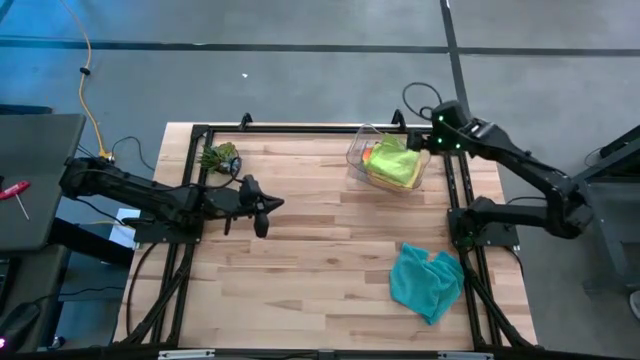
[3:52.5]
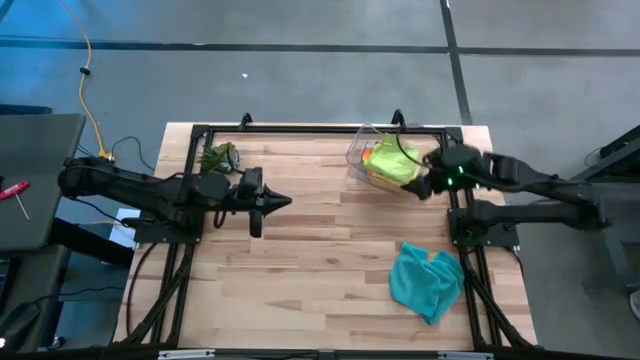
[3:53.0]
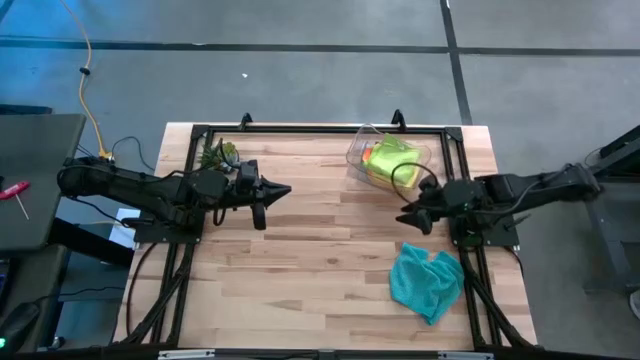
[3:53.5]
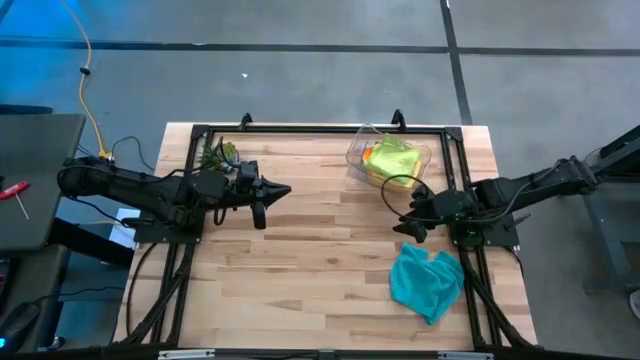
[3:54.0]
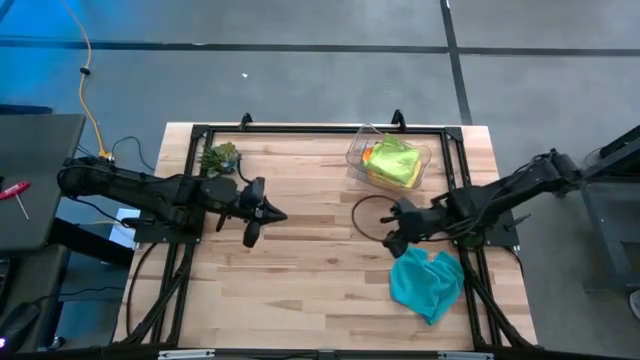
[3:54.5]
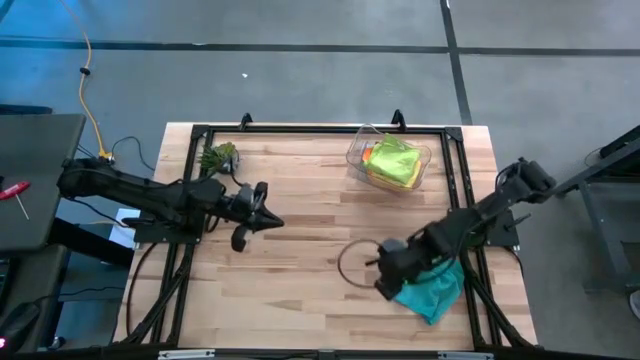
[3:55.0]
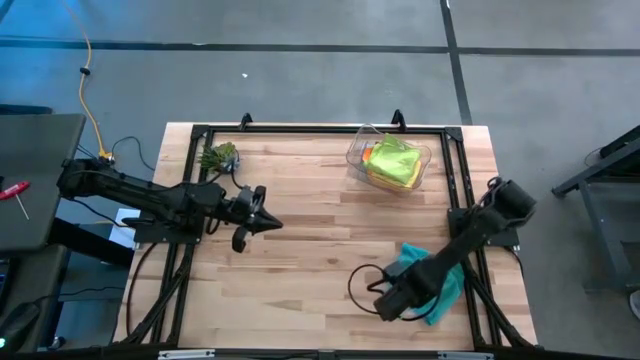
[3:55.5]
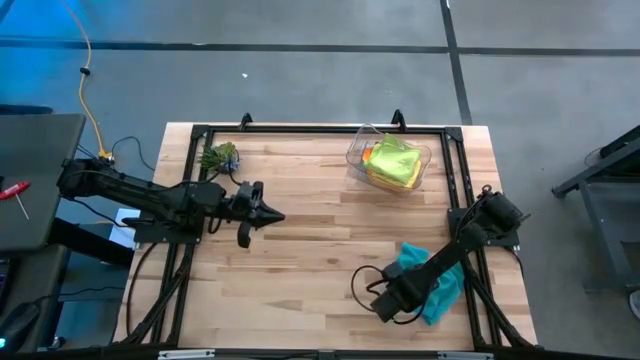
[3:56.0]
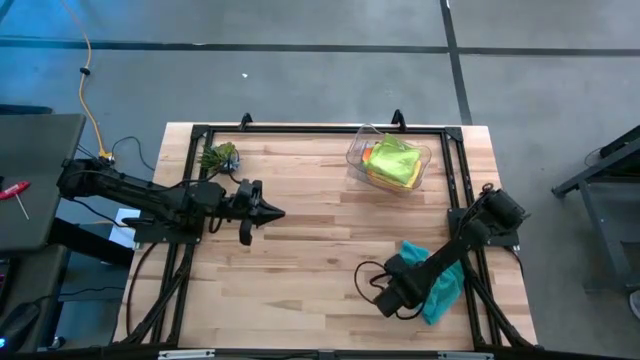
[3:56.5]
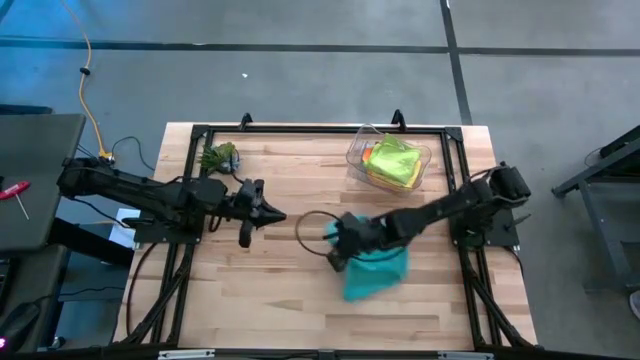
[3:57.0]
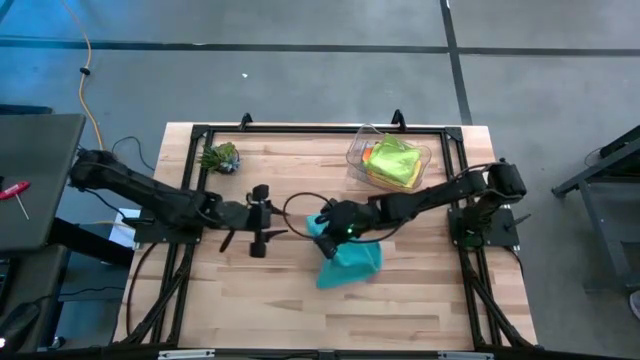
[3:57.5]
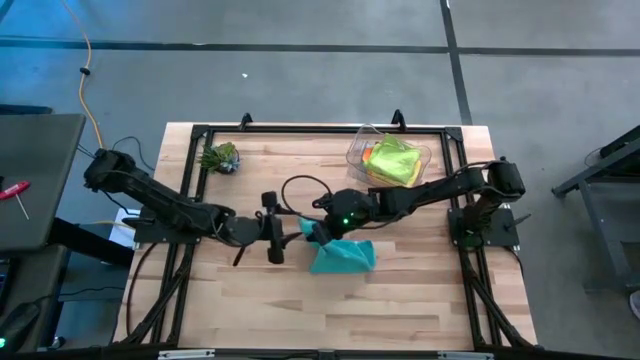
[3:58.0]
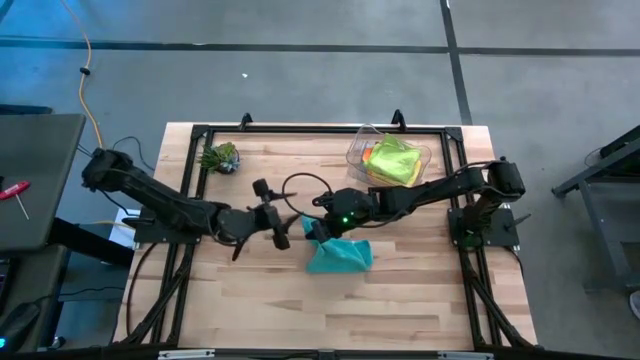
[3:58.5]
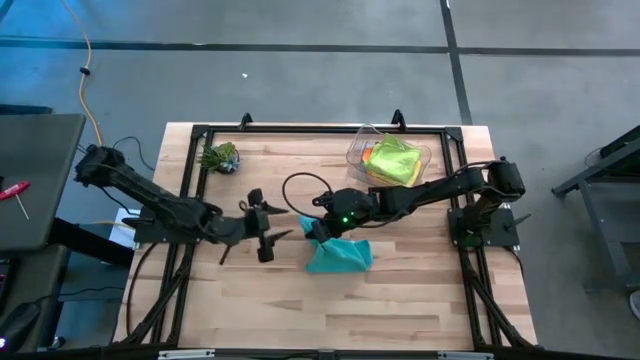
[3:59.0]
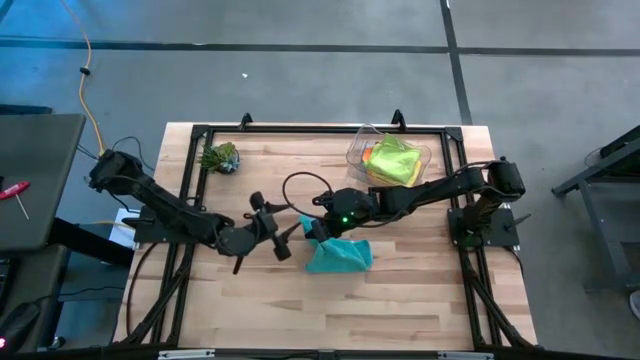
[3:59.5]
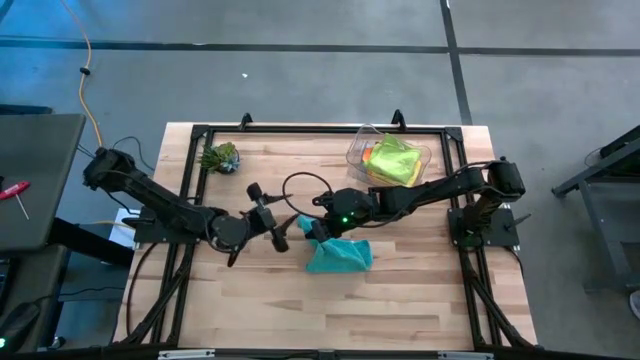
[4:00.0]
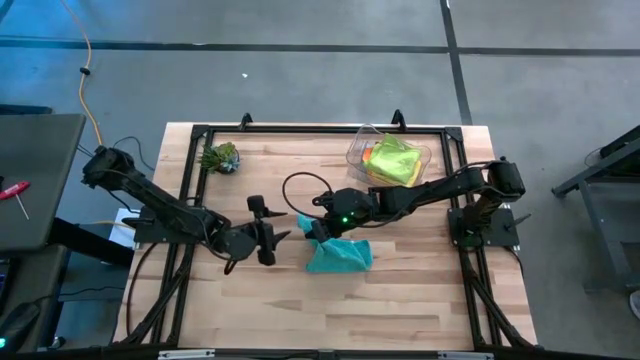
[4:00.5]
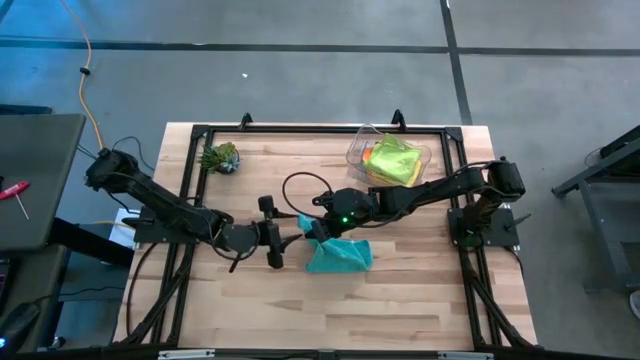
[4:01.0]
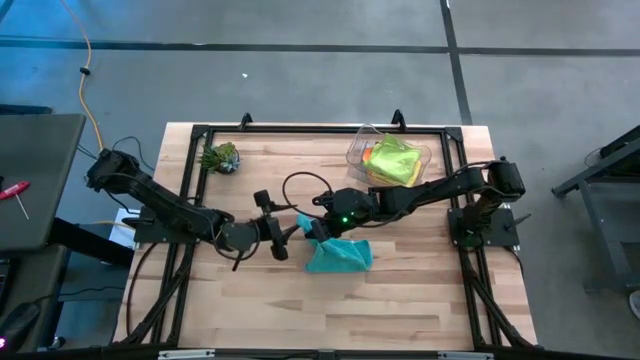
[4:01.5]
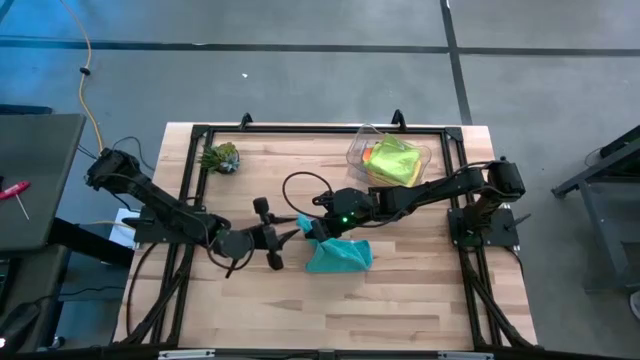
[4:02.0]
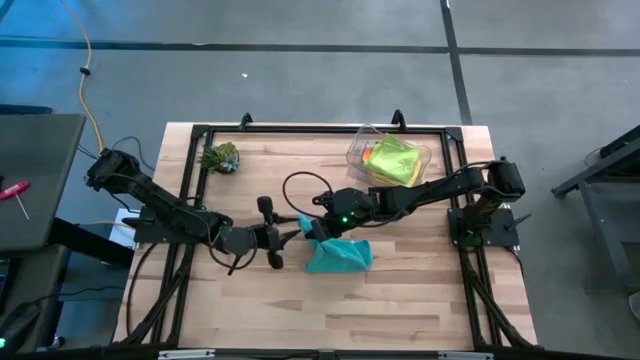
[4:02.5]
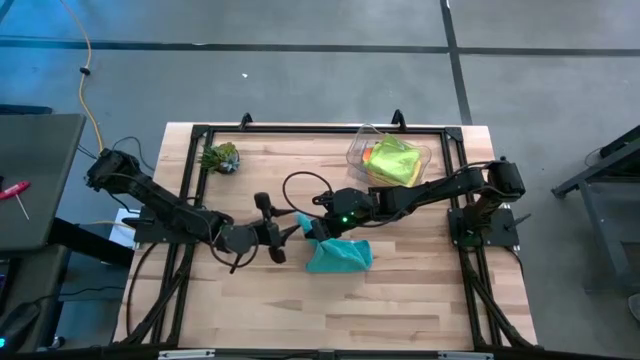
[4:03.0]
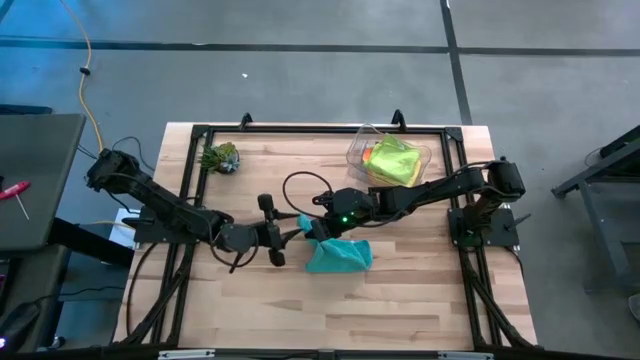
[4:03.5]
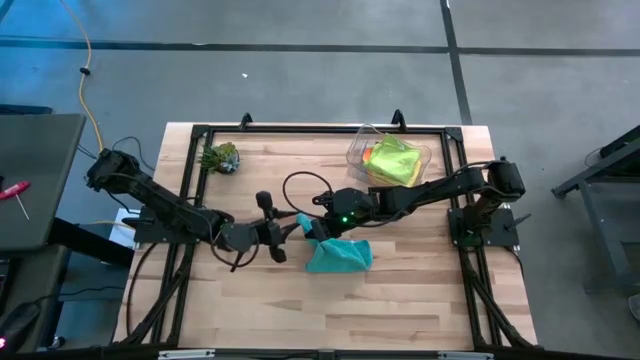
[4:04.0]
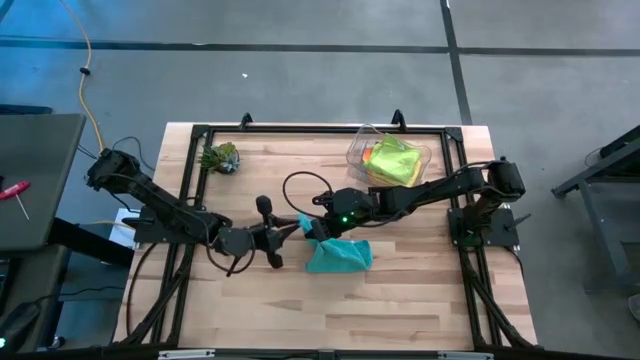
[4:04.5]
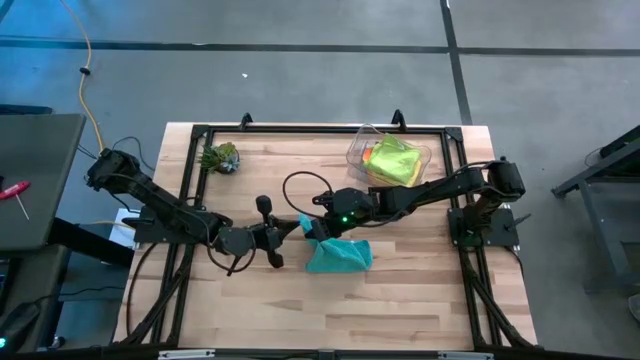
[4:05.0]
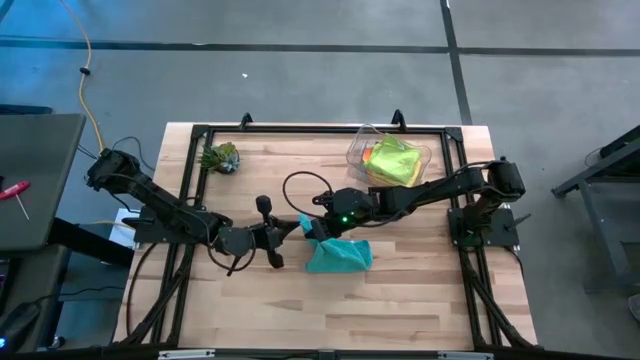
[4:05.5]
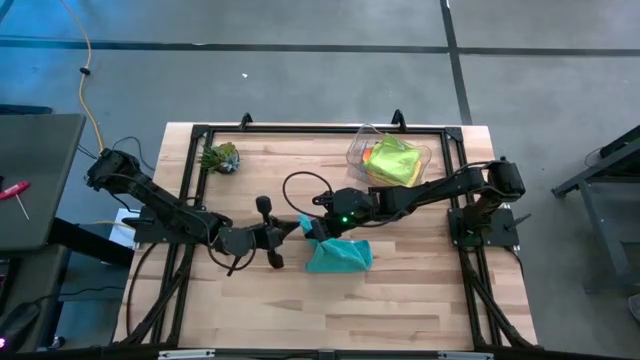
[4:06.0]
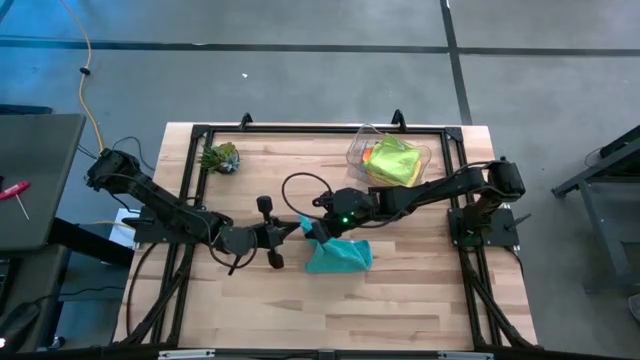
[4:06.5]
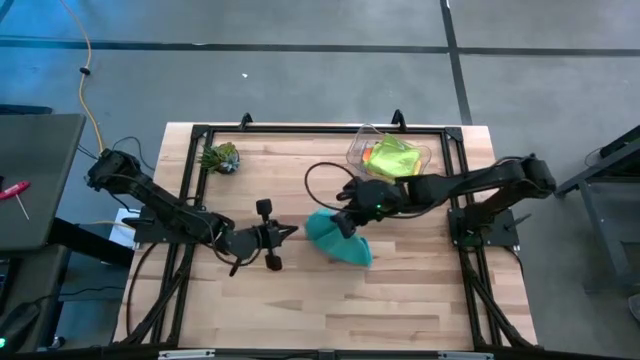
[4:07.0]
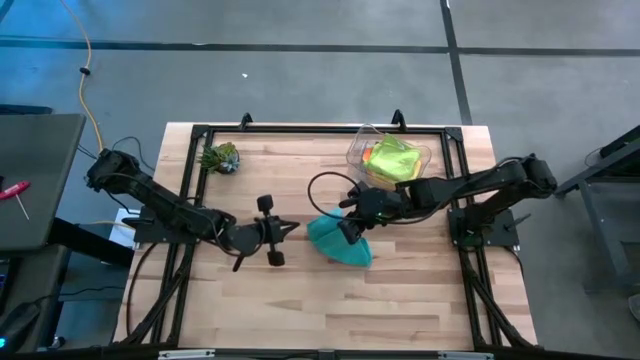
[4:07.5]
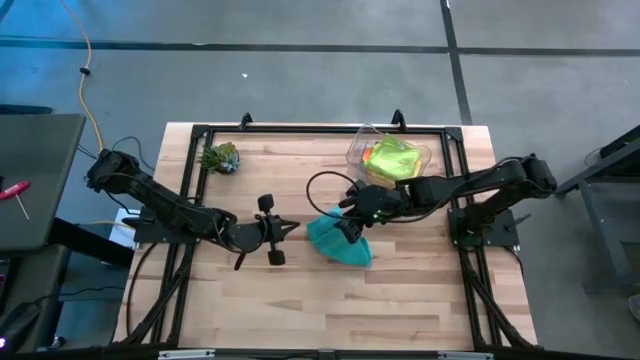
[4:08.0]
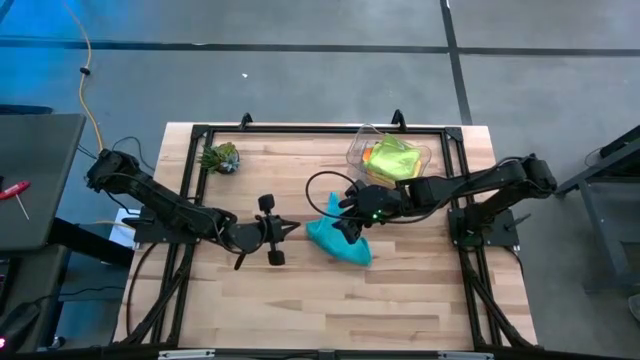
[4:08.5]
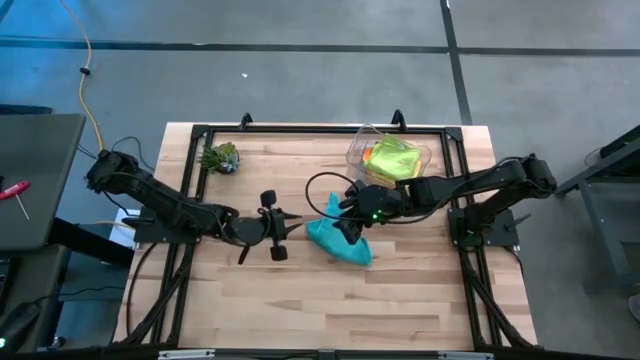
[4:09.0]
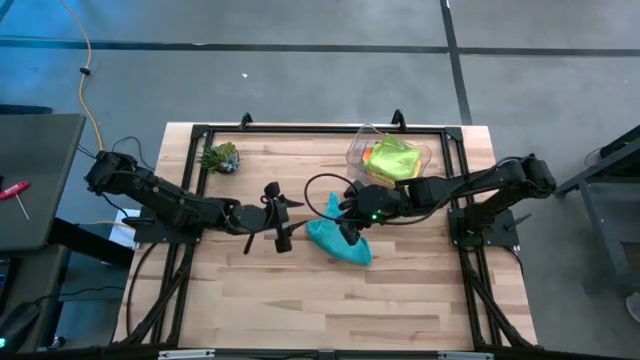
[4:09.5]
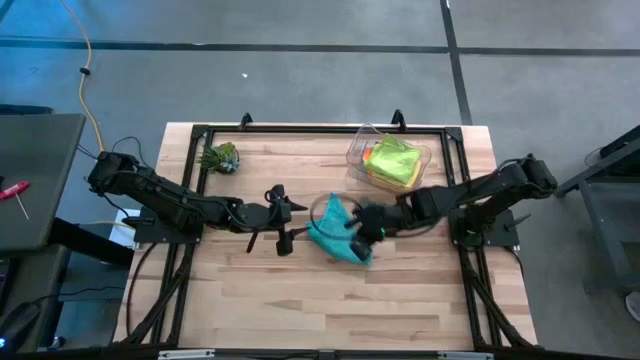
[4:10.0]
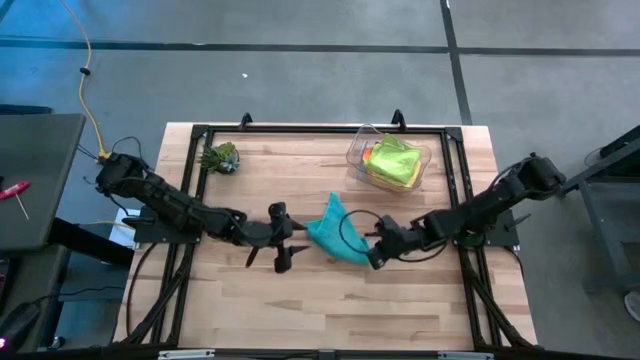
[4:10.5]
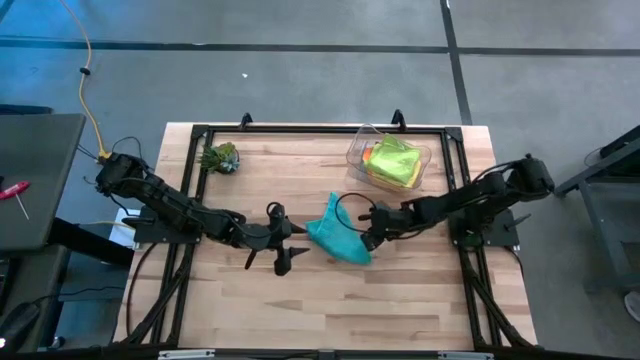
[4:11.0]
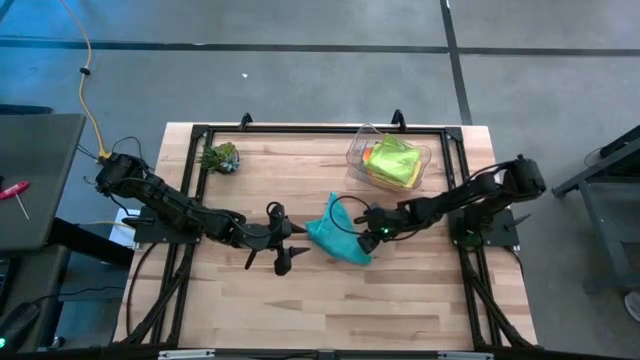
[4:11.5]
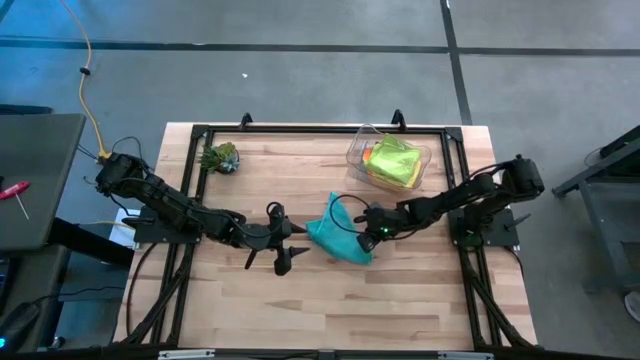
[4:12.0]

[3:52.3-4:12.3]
Task: Fold microfiber towels
Fold the blue microfiber towel
